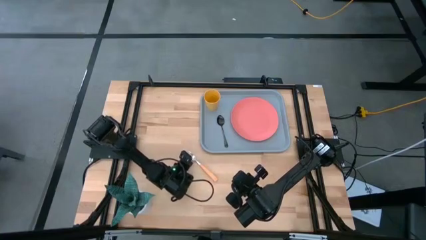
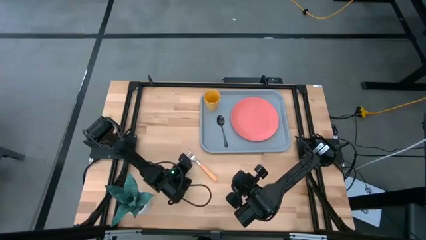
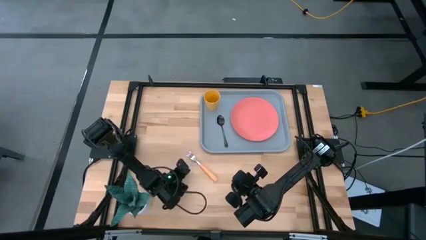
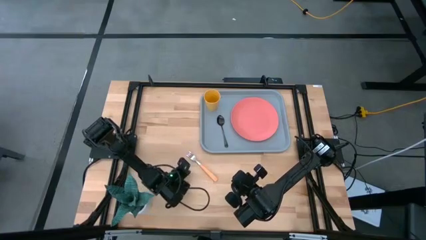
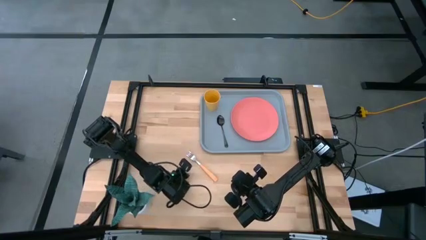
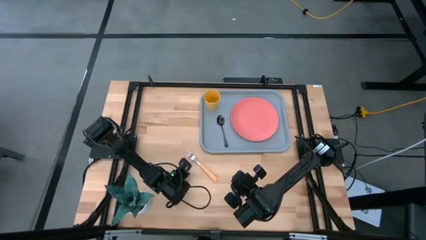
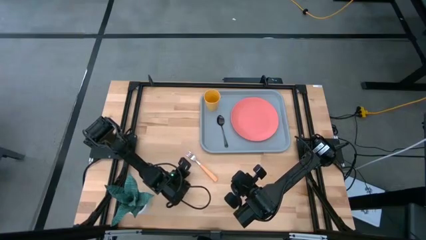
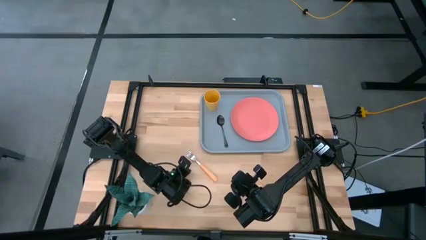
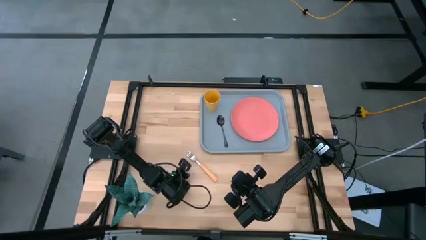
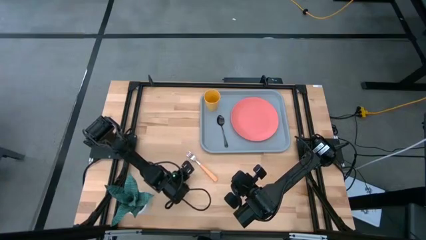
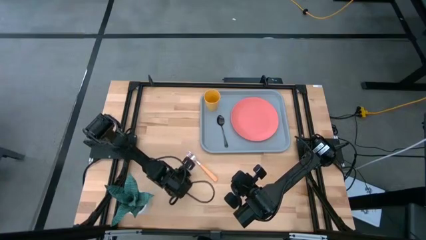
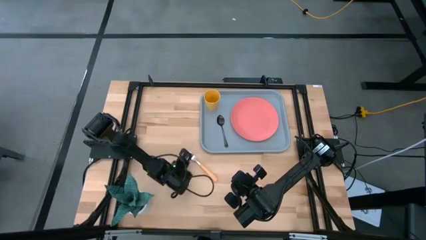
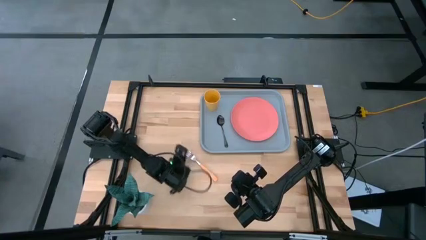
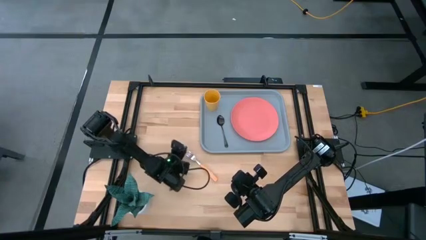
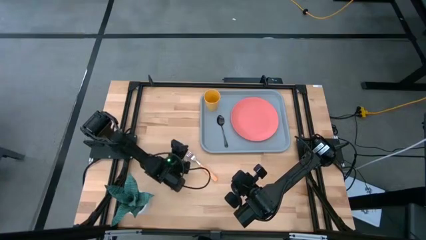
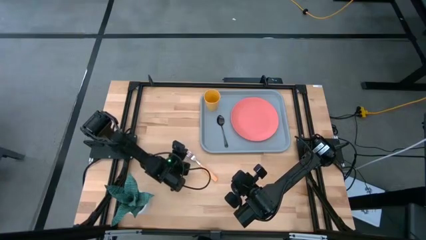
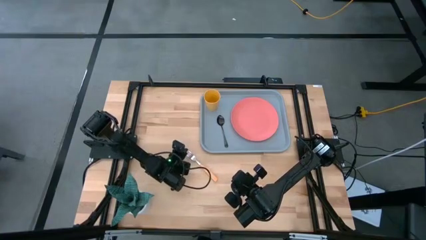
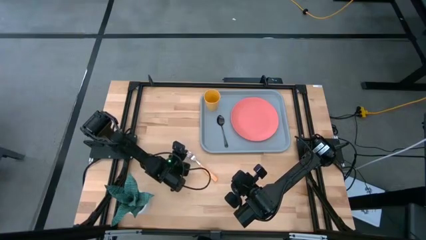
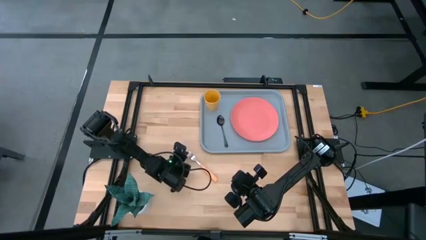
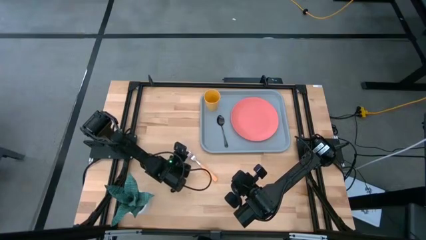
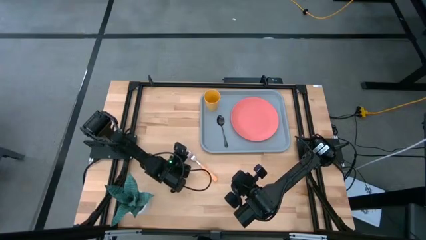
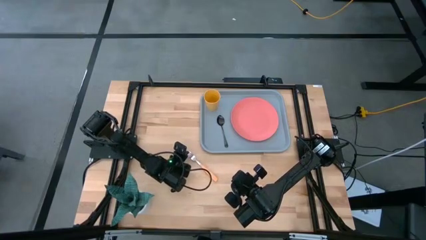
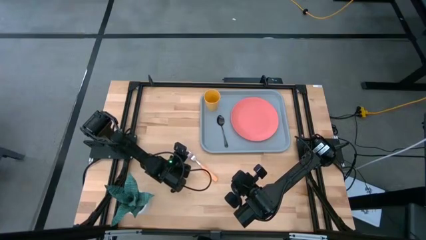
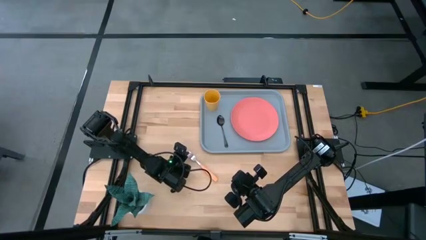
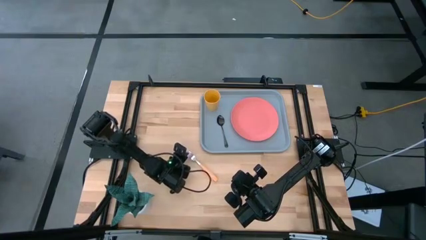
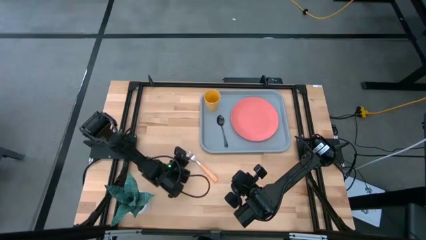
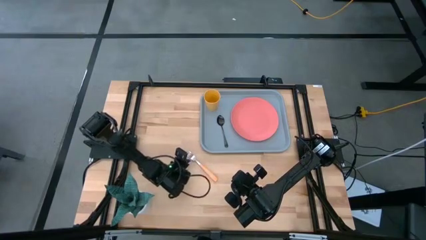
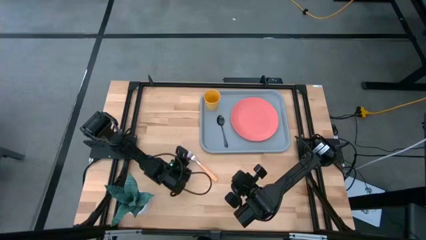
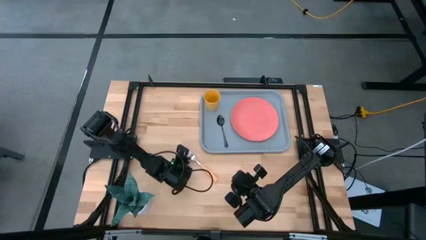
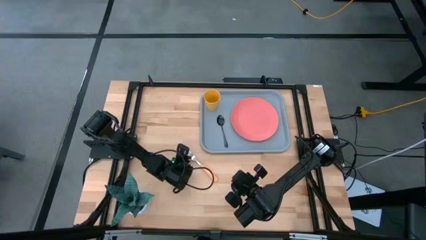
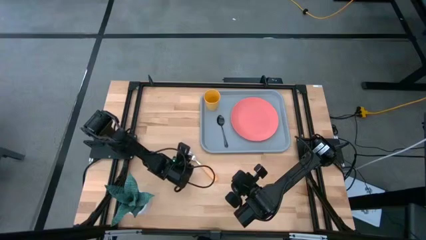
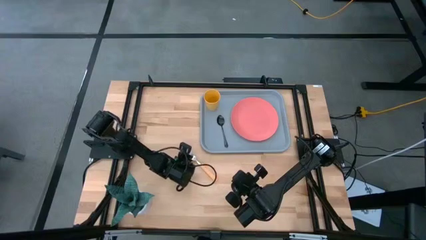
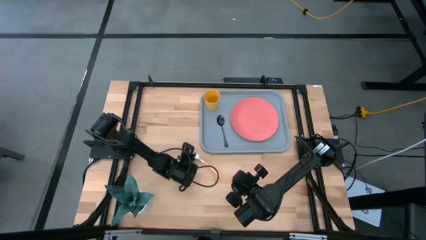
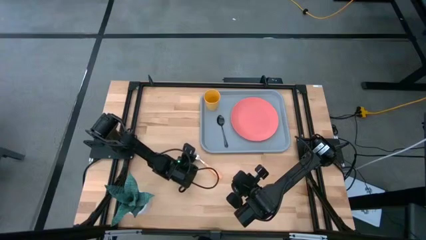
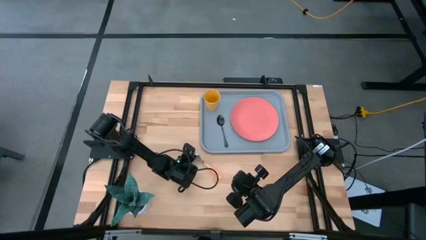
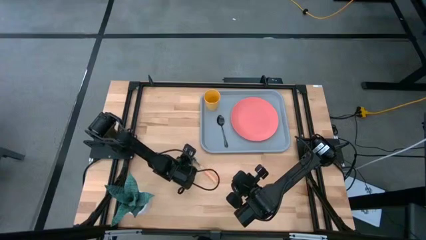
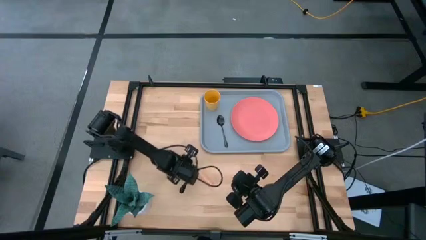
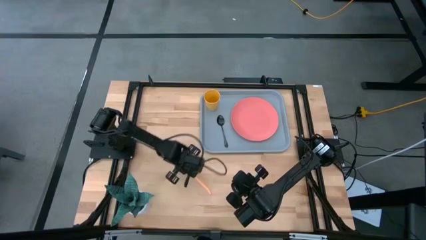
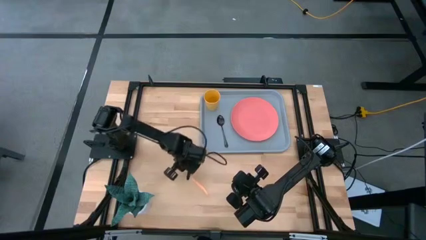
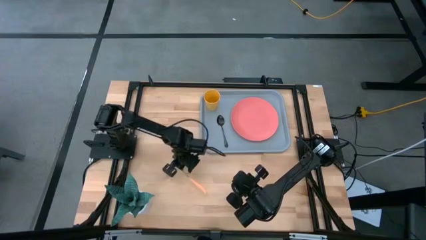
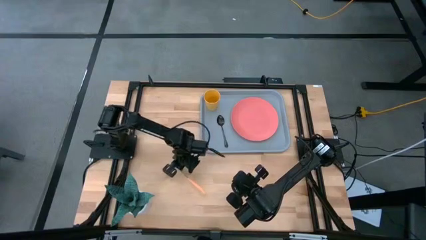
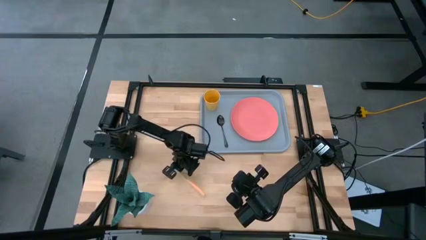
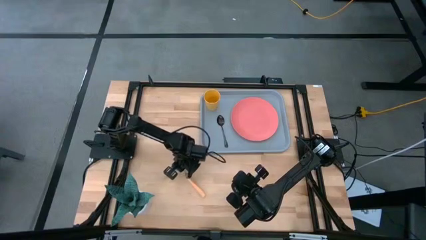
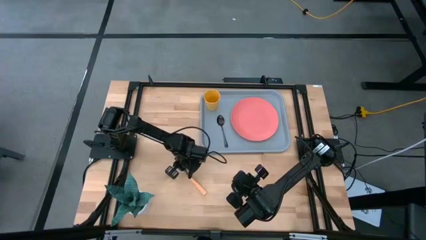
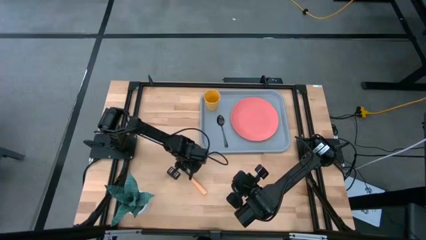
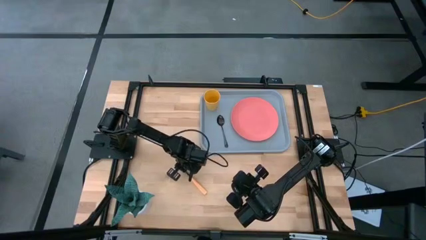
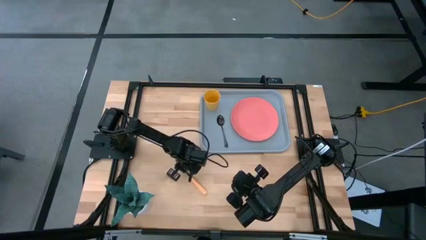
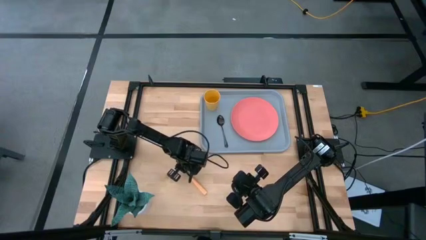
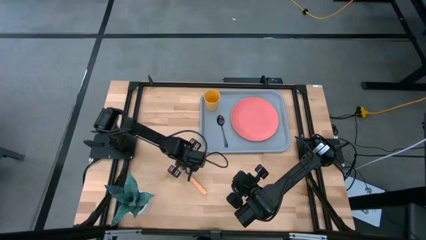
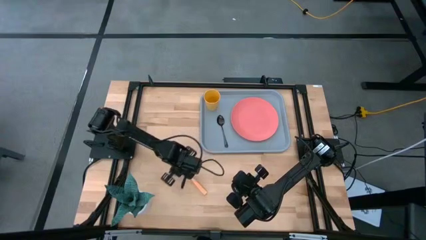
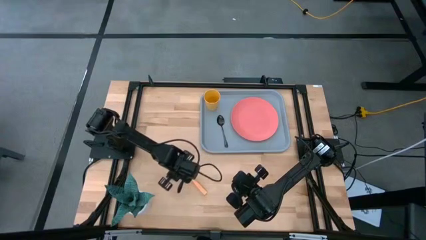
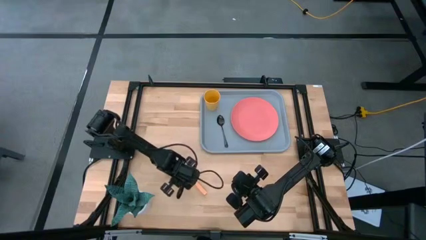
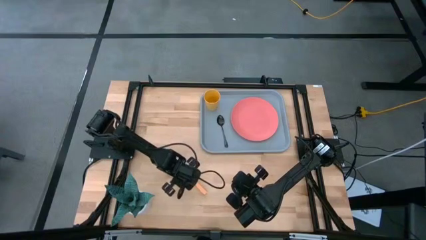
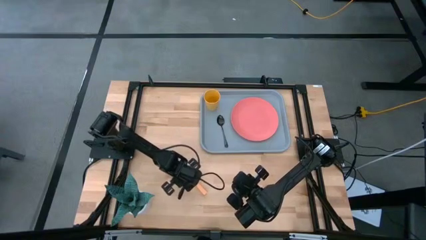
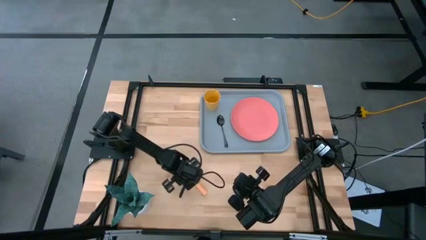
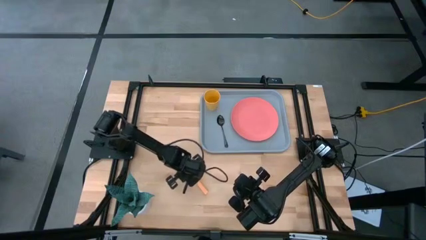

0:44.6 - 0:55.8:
Task: Pick and place plate/cup/fork/spoon on tray
Put the orange fork on the gray tray to the left of the black spoon

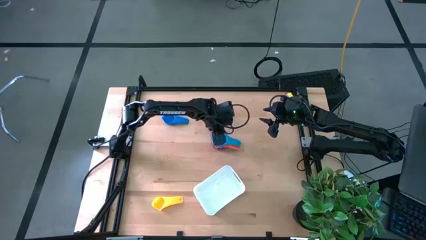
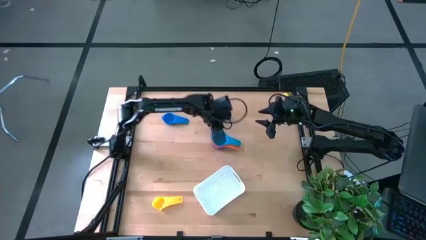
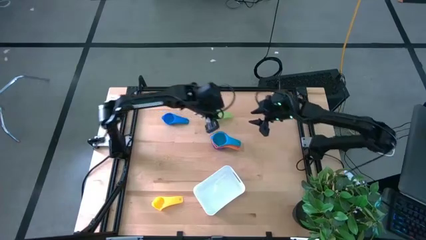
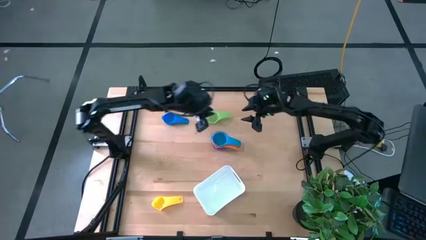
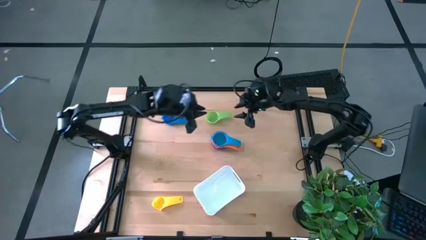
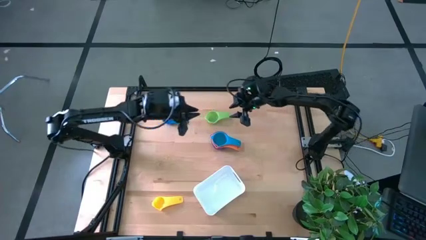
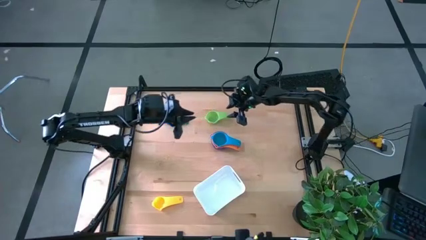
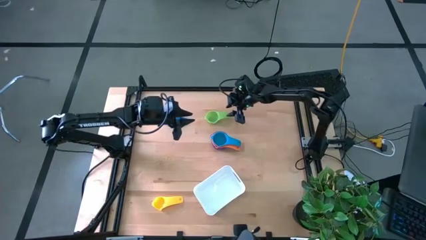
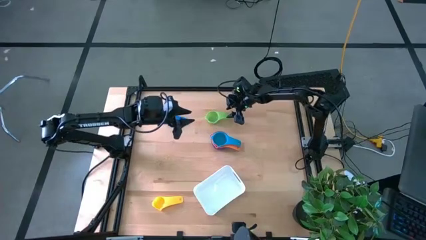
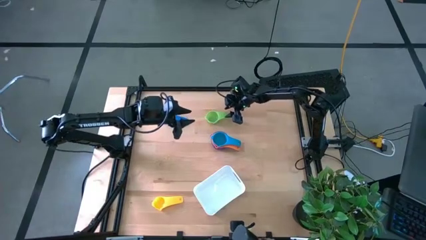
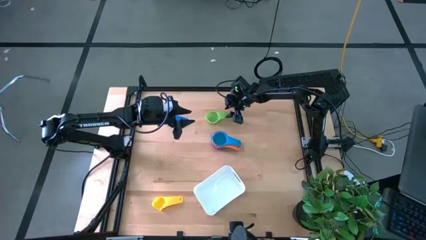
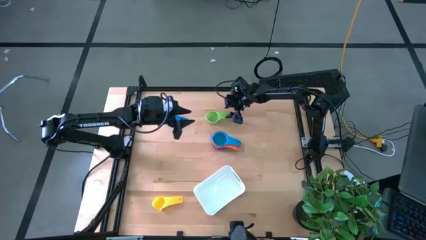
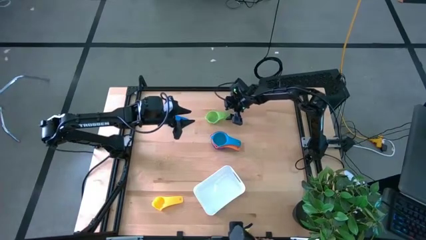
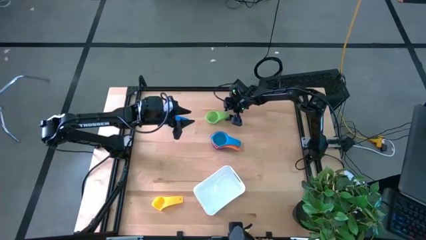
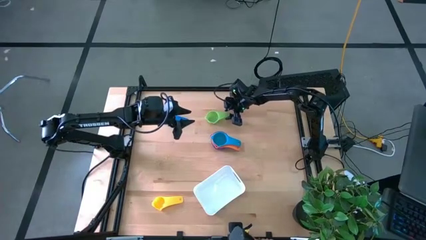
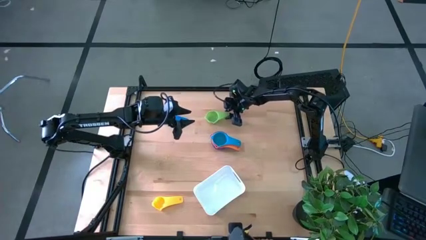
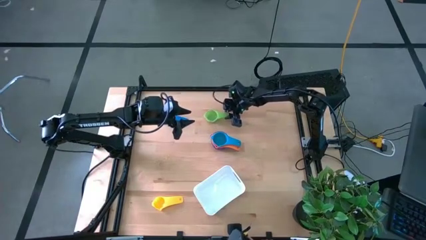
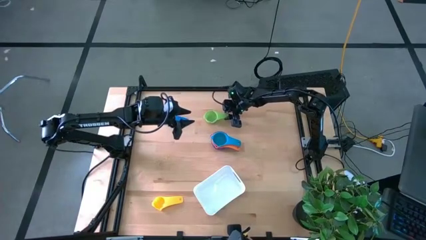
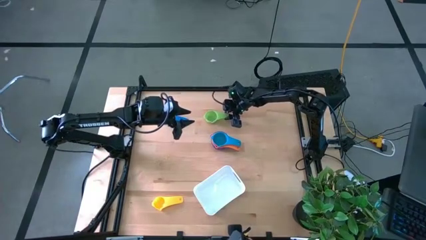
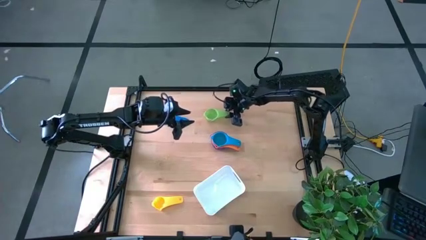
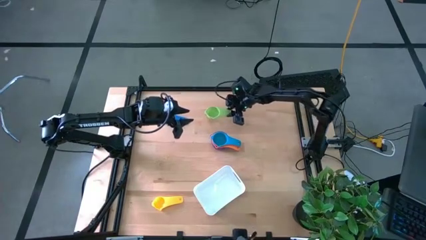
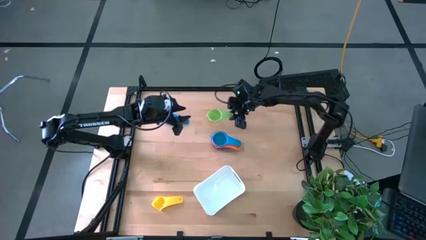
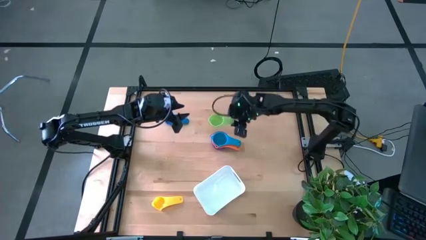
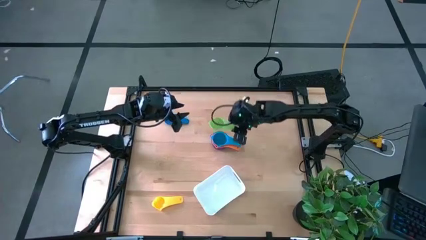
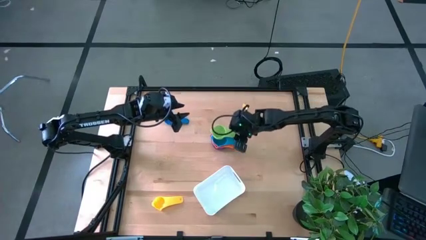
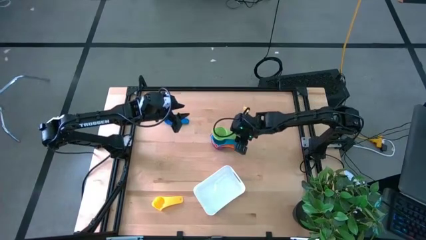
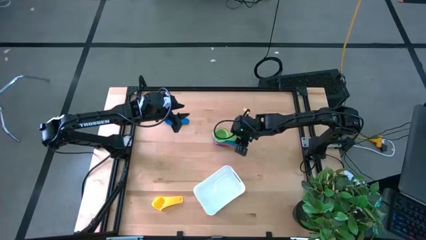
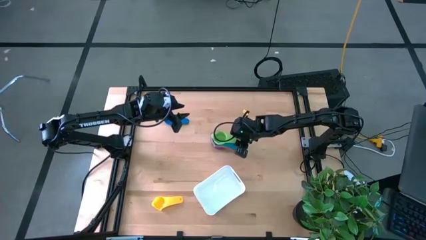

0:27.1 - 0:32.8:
Task: Nest measuring cups in basket
Stack the green measuring cup on top of the light blue measuring cup
